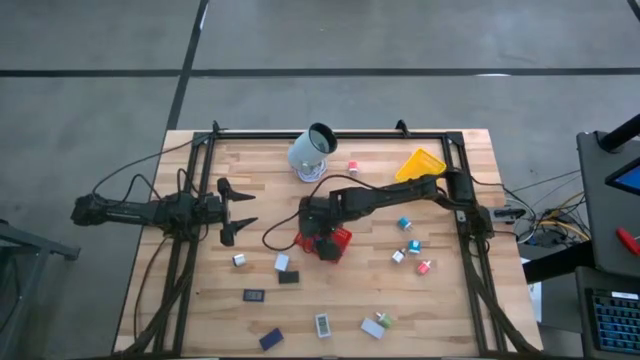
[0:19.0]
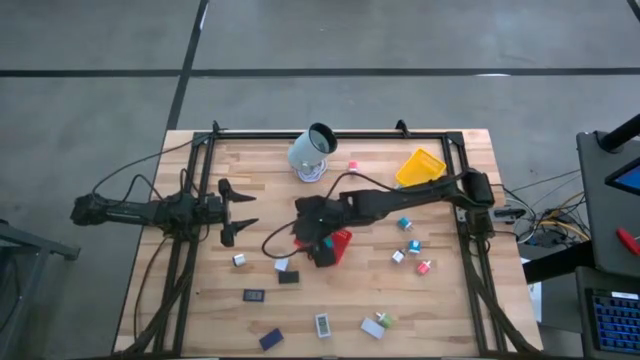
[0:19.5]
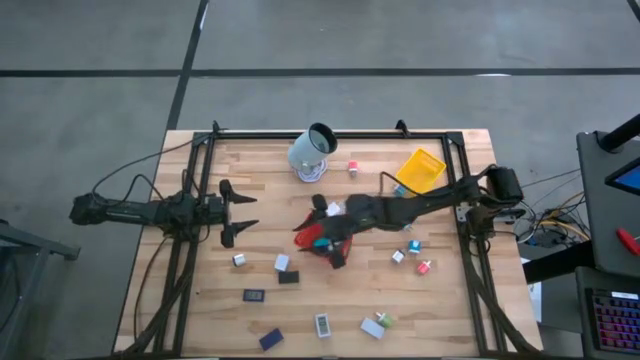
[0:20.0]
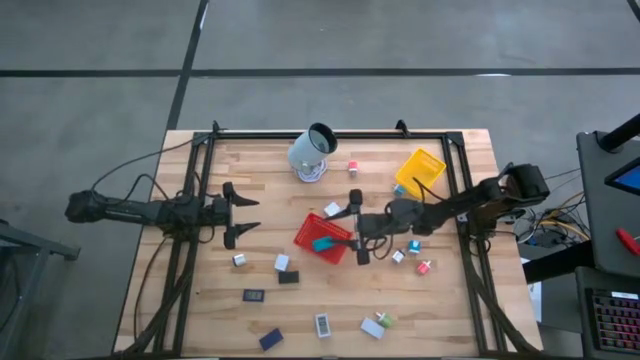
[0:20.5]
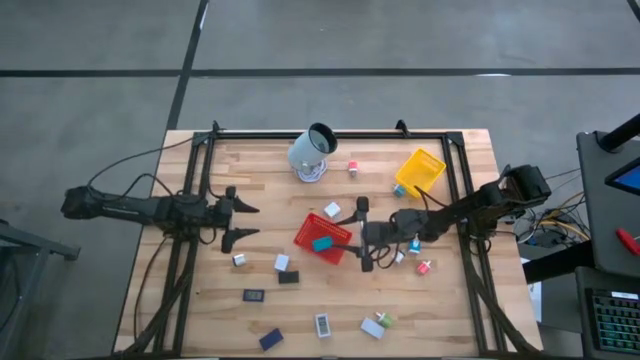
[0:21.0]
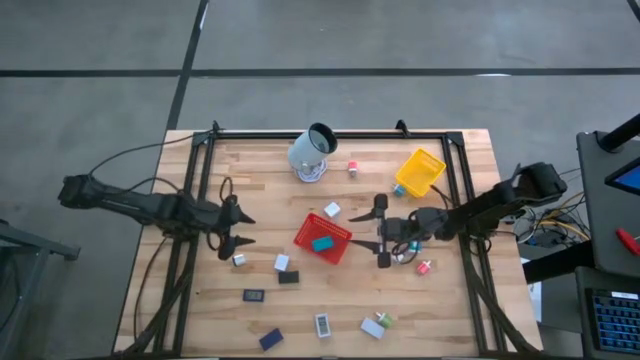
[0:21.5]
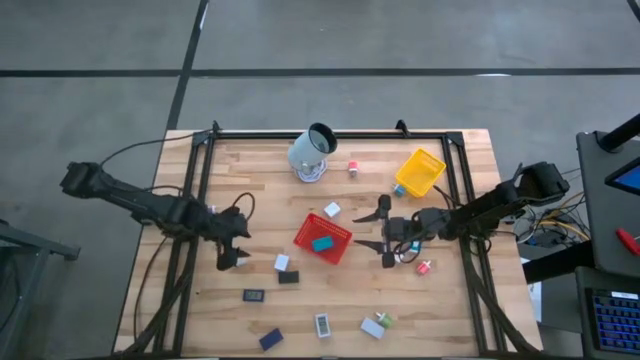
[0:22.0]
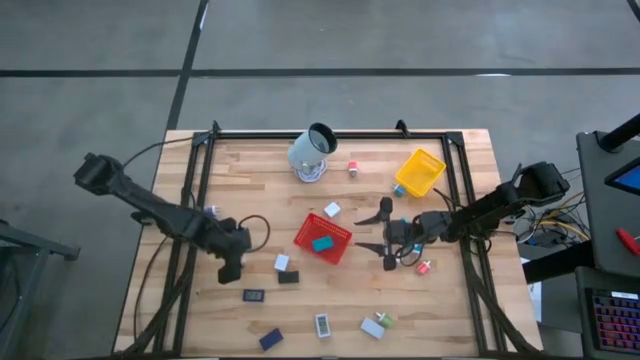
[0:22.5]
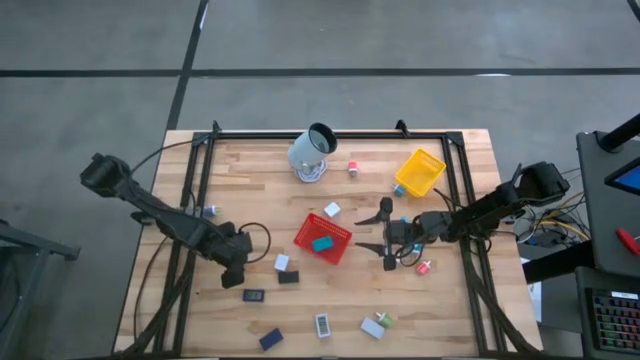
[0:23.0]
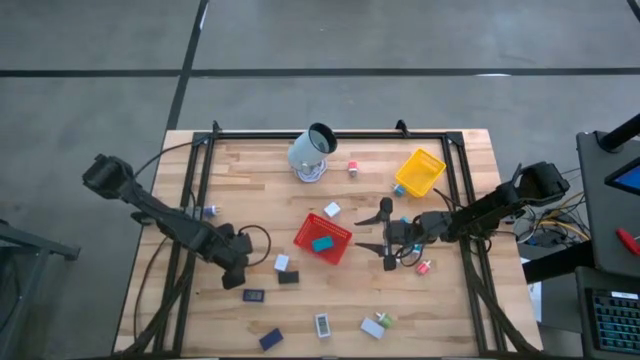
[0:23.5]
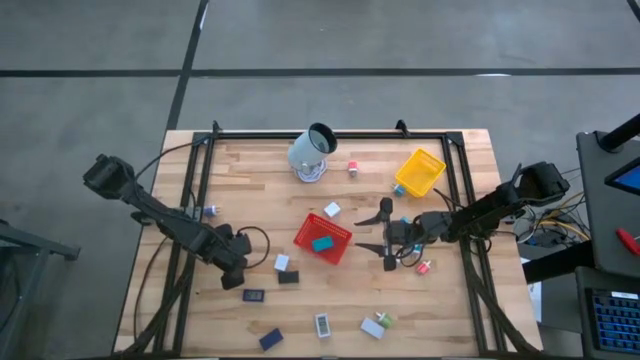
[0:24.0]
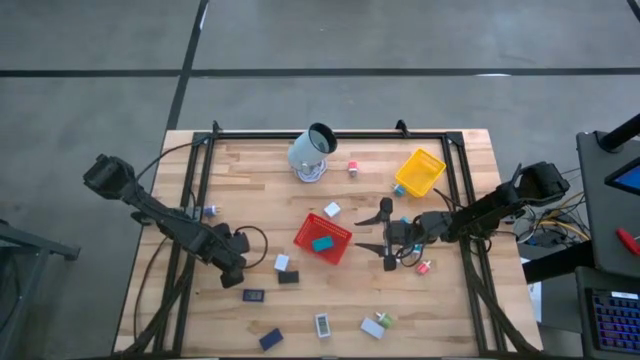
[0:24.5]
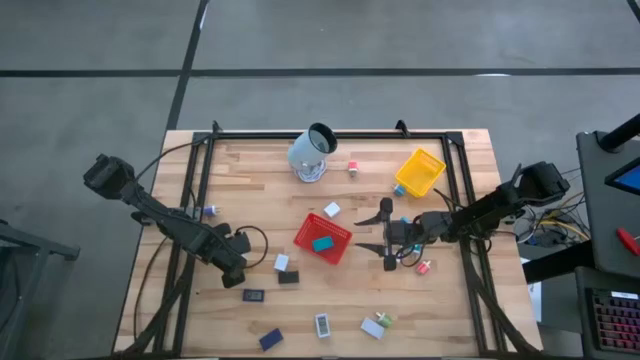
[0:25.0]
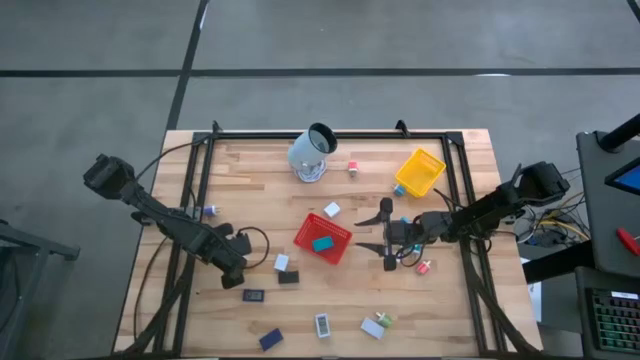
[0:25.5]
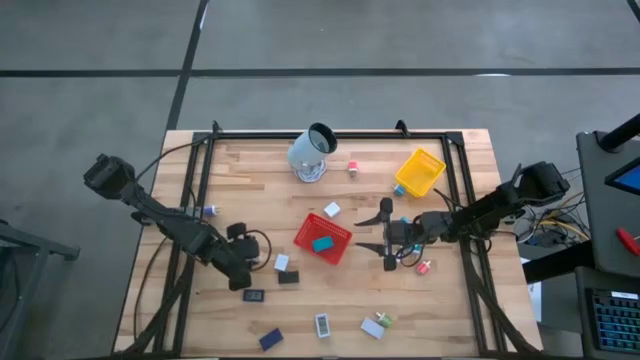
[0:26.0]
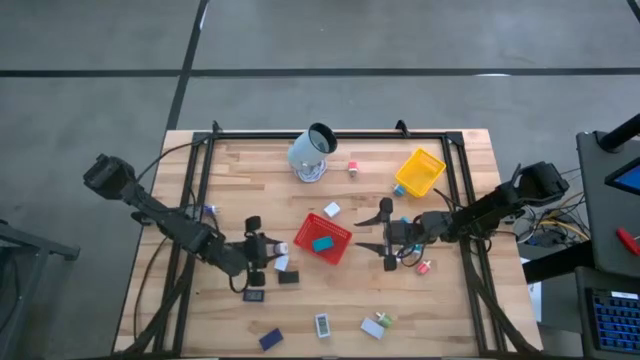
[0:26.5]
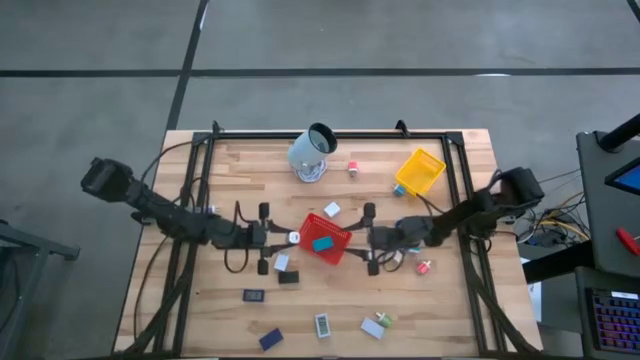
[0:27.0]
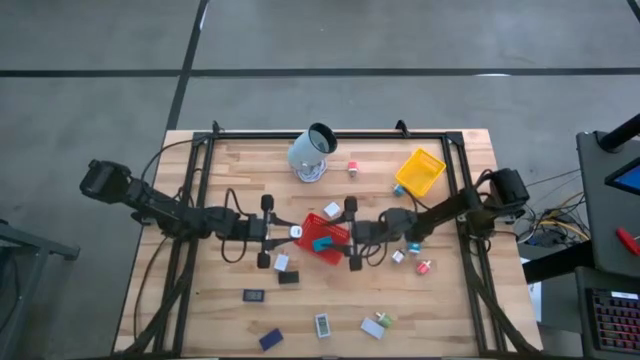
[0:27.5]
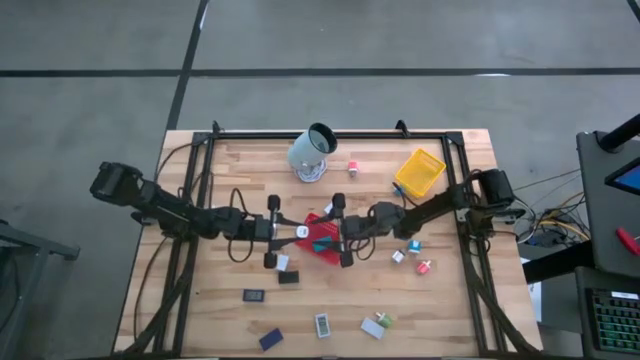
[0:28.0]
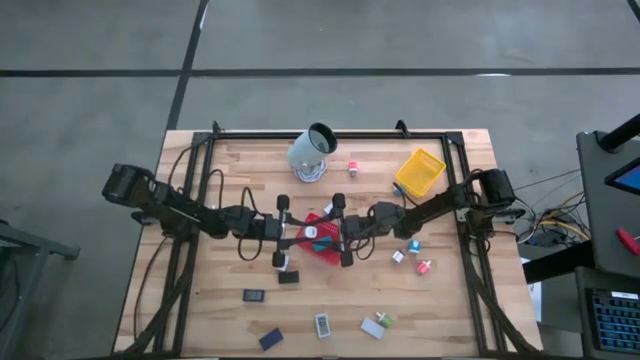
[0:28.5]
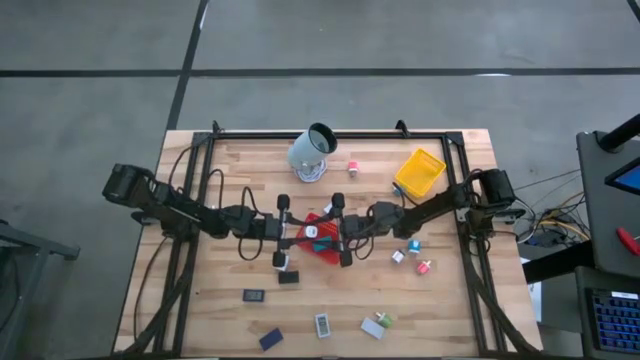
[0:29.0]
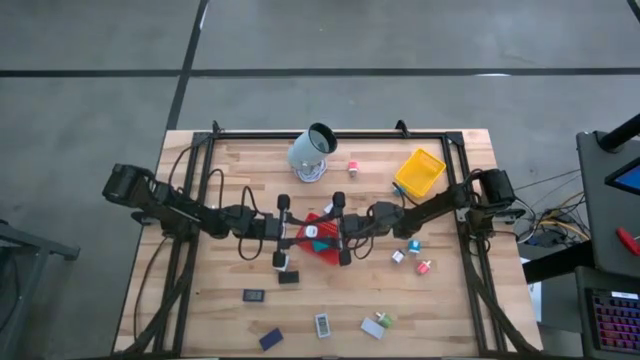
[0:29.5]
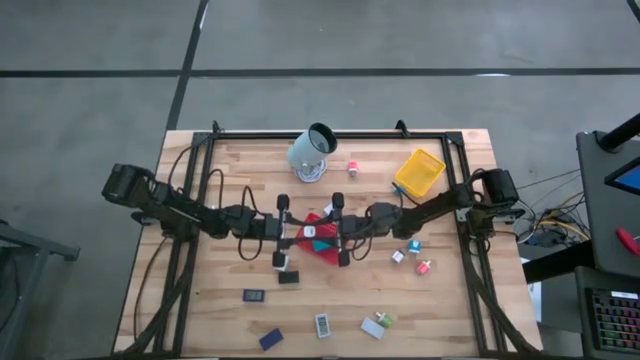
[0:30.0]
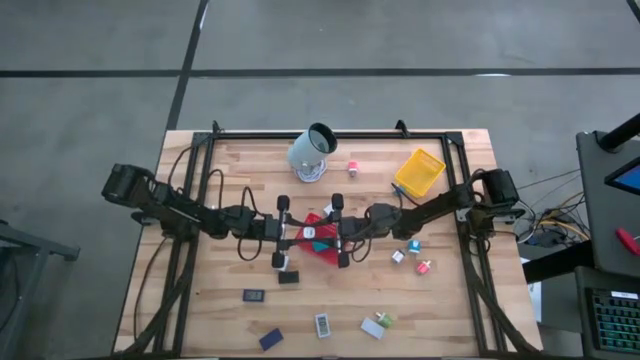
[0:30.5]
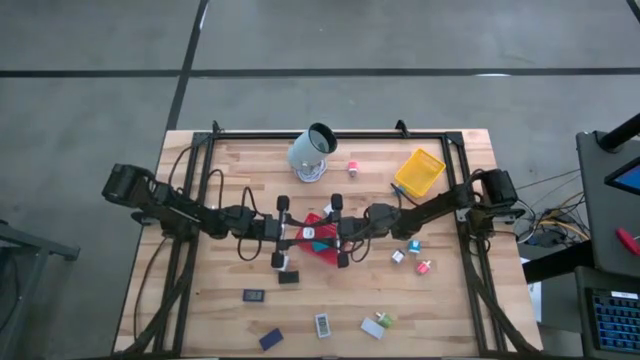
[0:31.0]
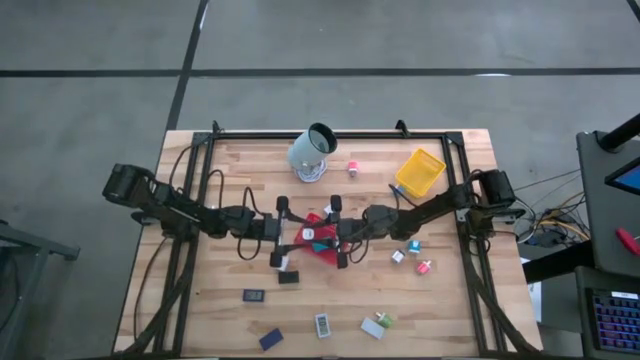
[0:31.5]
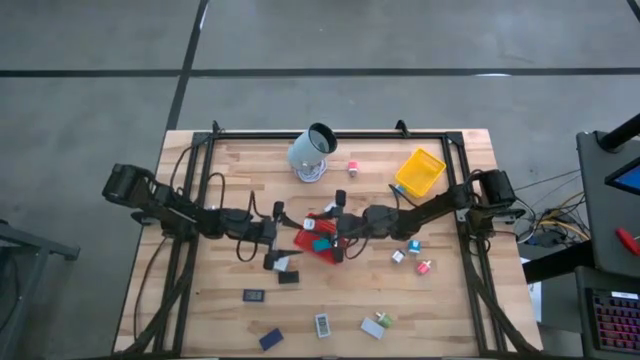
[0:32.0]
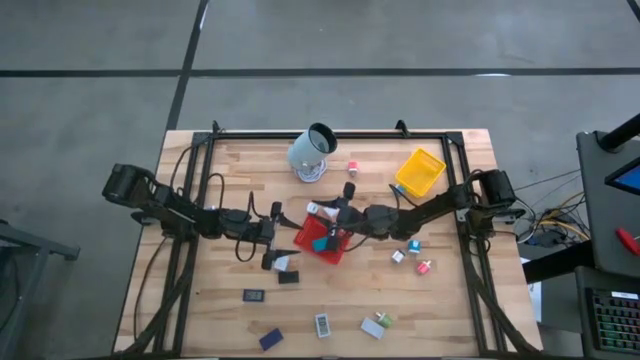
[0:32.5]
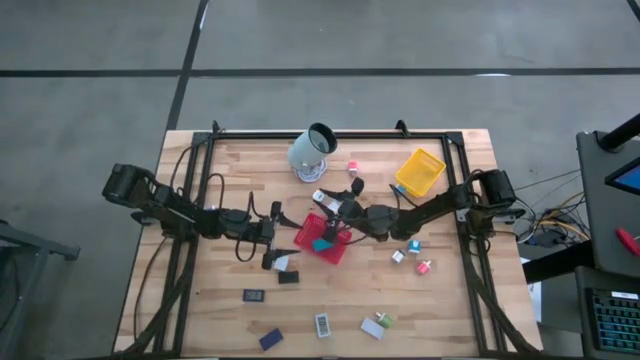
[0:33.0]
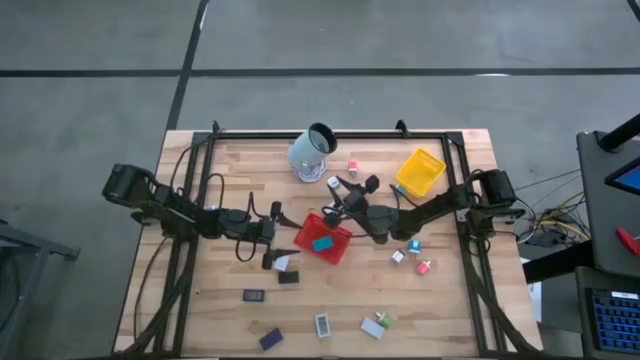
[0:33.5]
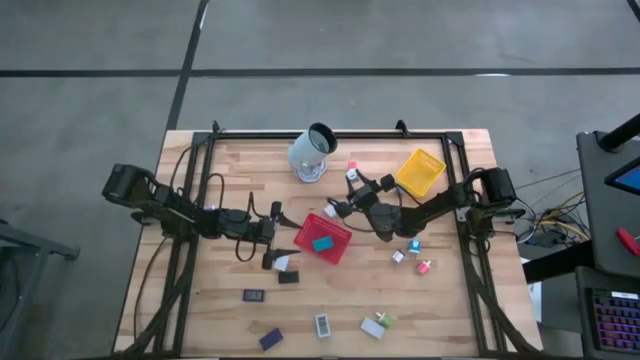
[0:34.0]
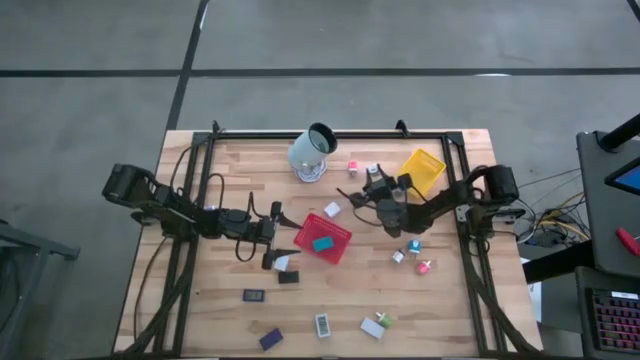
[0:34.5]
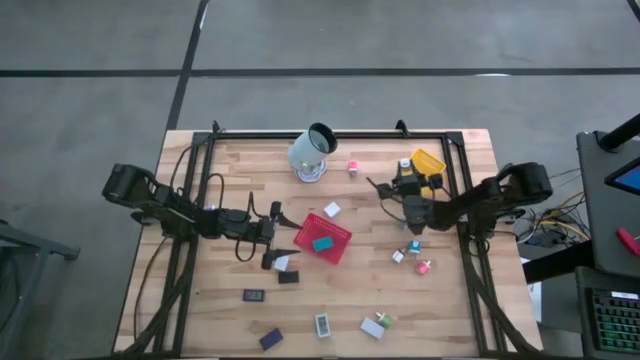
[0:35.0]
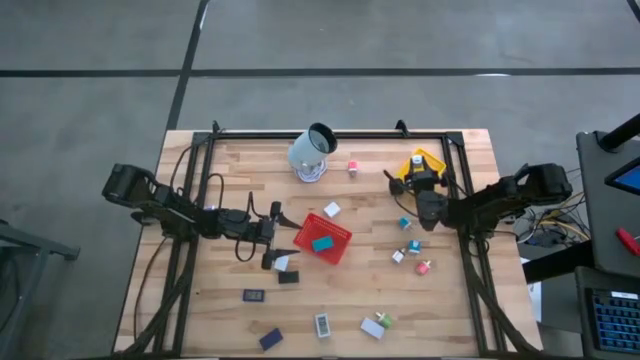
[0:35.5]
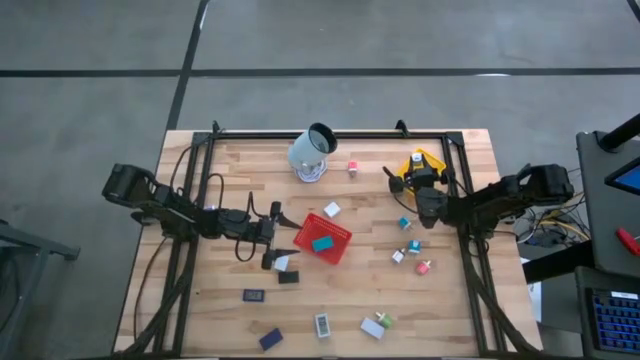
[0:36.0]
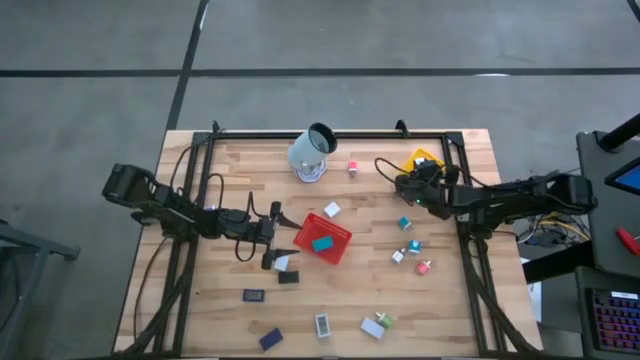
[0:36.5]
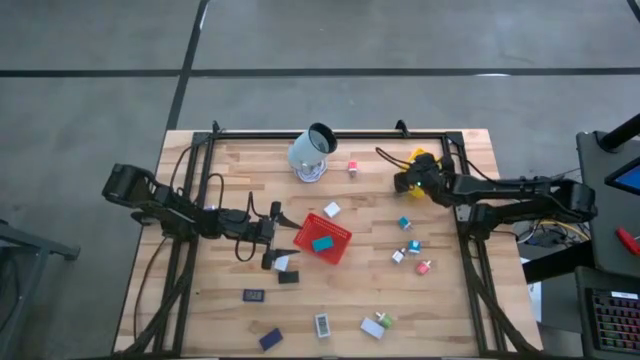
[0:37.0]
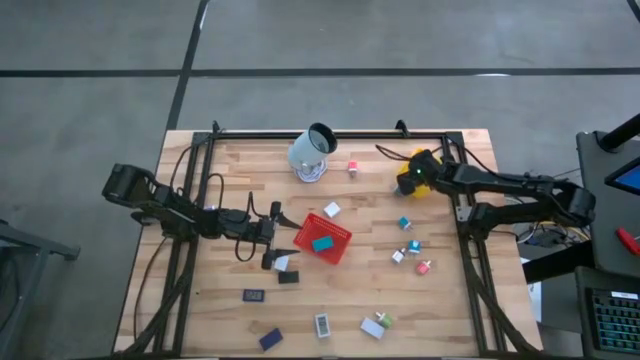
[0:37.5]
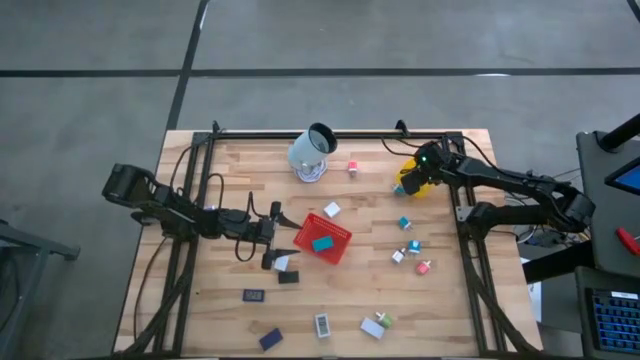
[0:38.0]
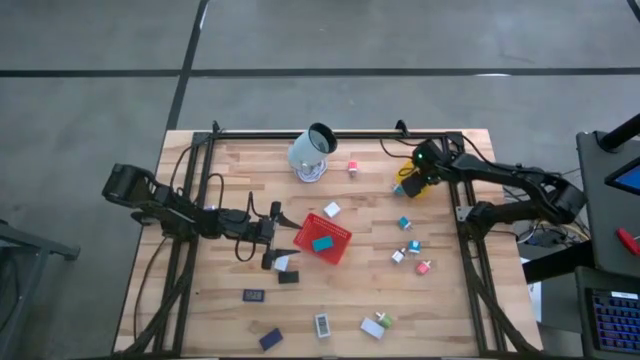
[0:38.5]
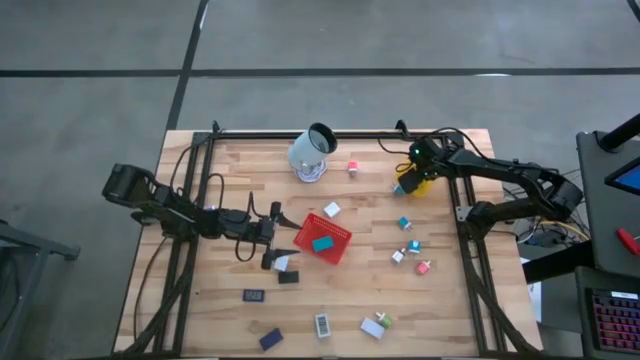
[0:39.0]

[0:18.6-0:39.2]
Task: Pick & Place Office items
Put the left white black charger adapter into the yellow basket
